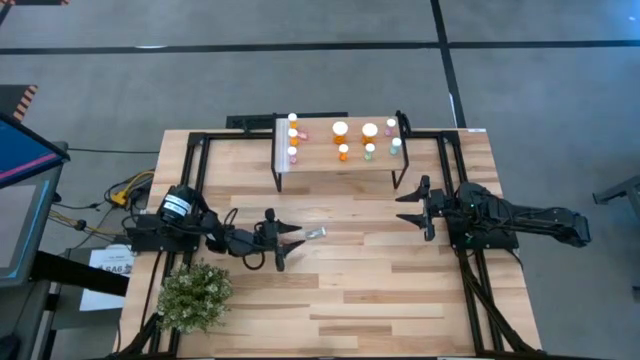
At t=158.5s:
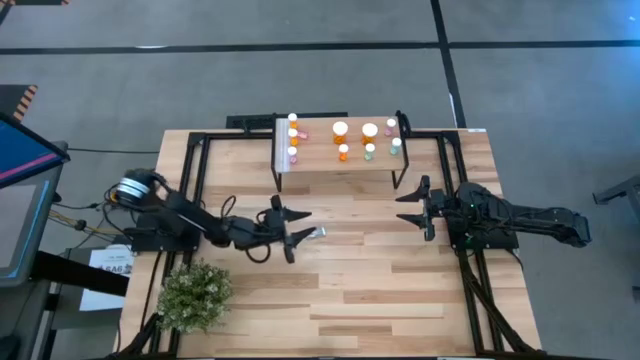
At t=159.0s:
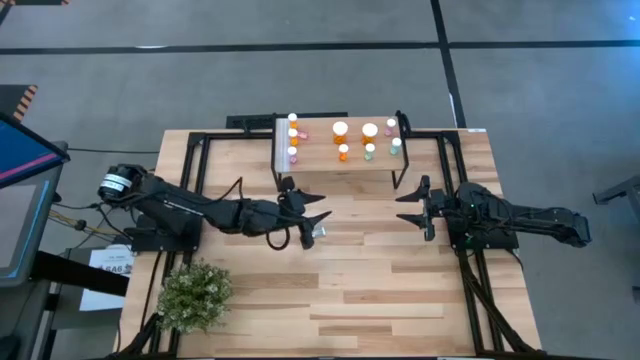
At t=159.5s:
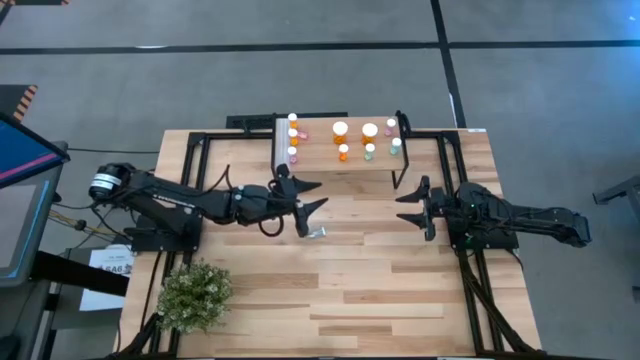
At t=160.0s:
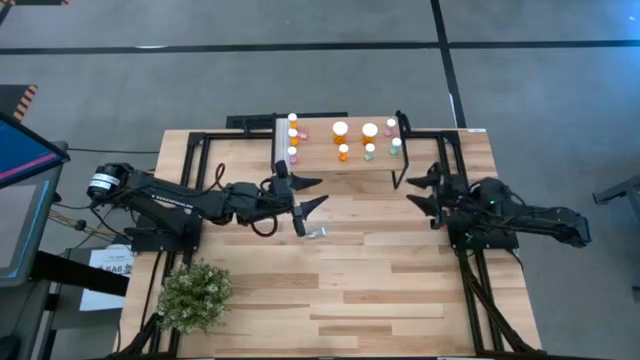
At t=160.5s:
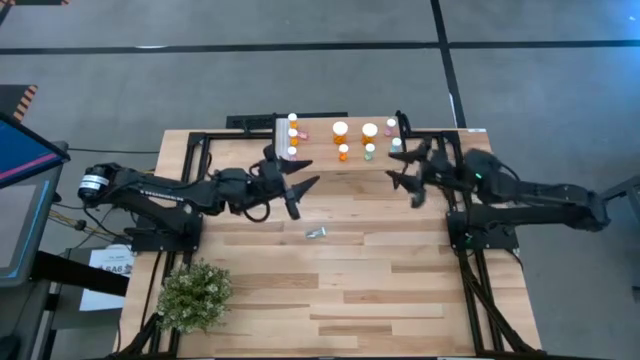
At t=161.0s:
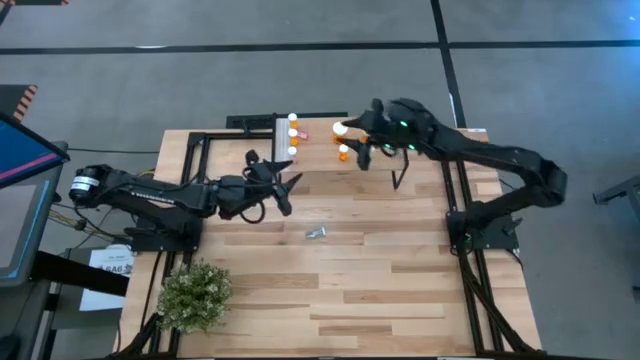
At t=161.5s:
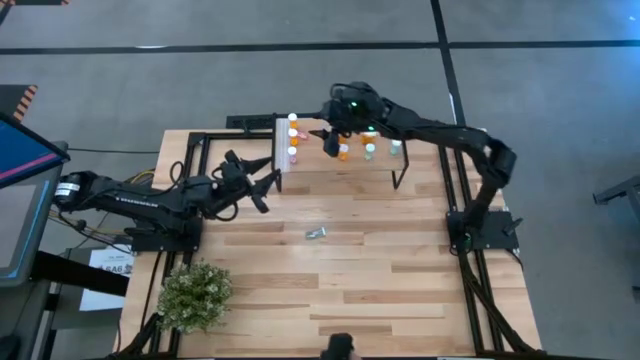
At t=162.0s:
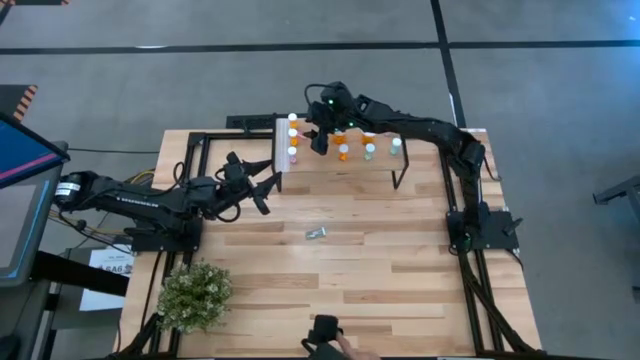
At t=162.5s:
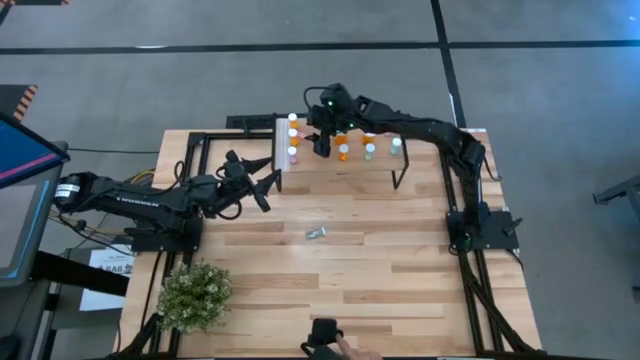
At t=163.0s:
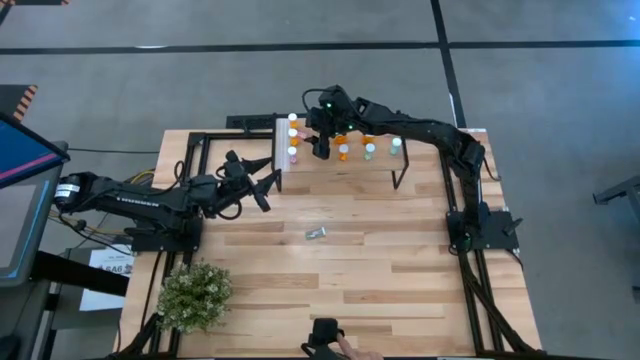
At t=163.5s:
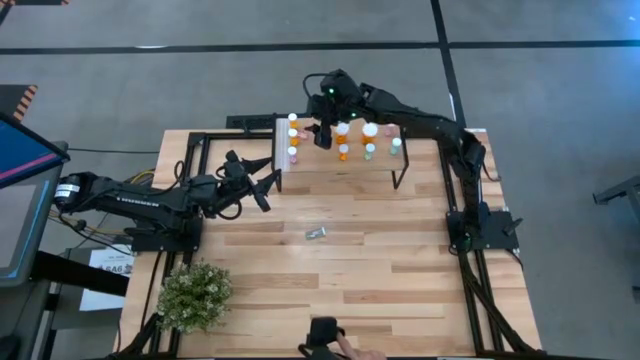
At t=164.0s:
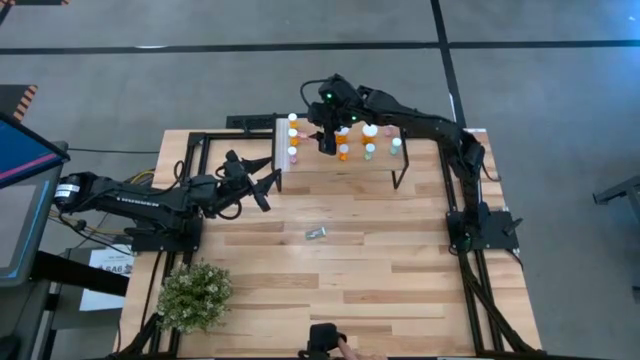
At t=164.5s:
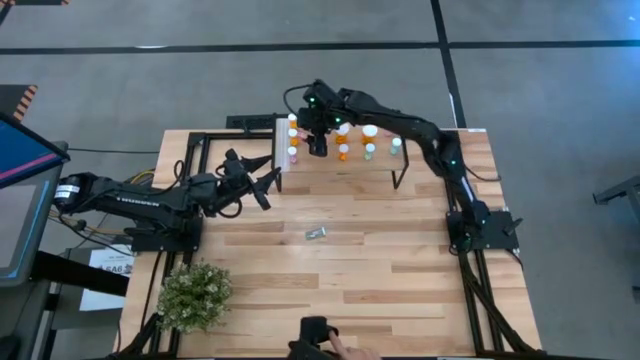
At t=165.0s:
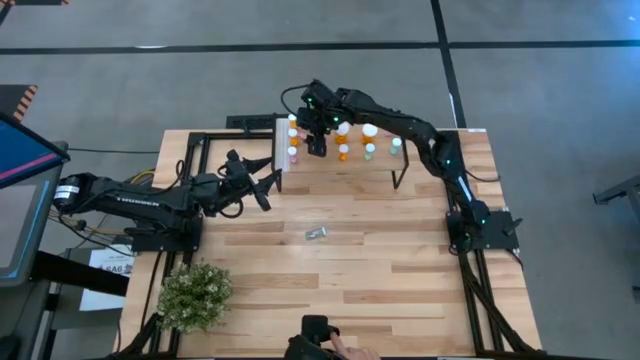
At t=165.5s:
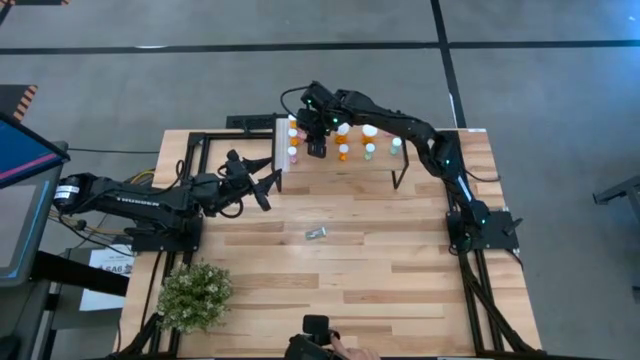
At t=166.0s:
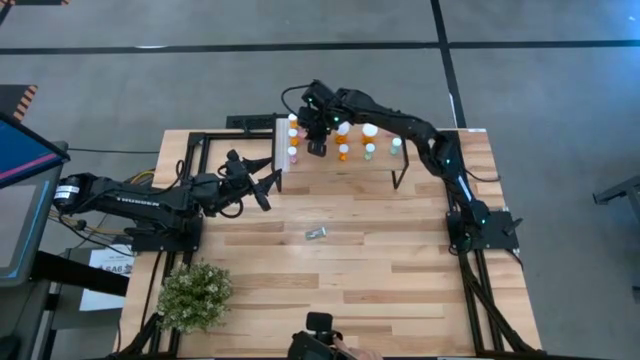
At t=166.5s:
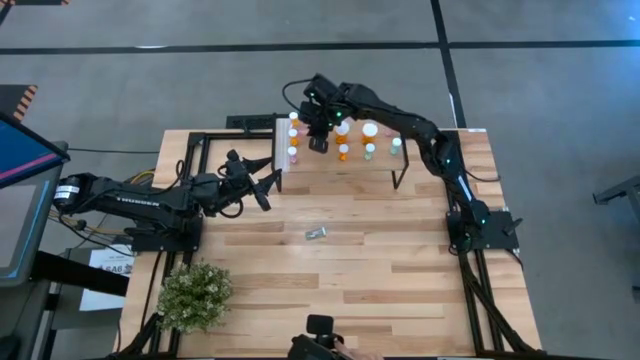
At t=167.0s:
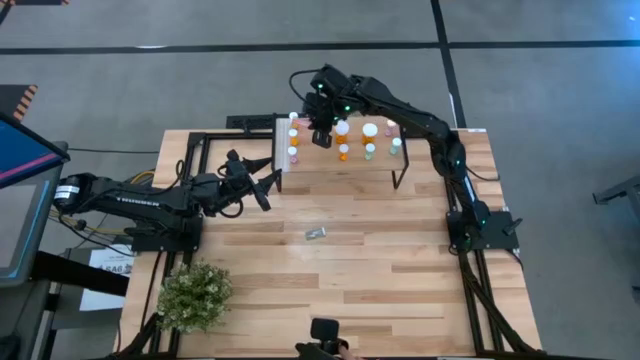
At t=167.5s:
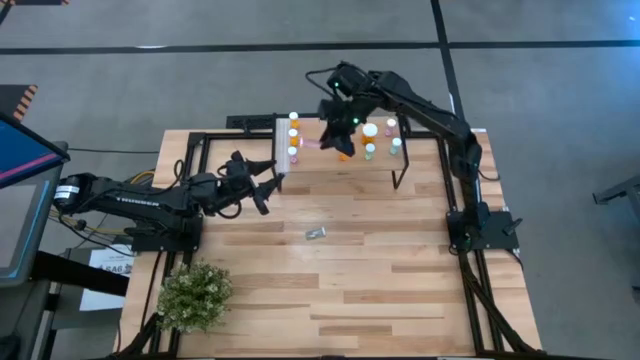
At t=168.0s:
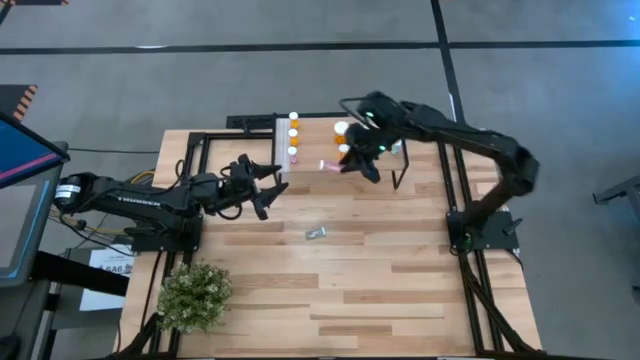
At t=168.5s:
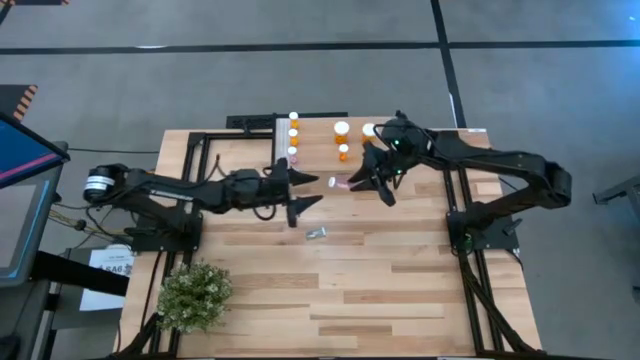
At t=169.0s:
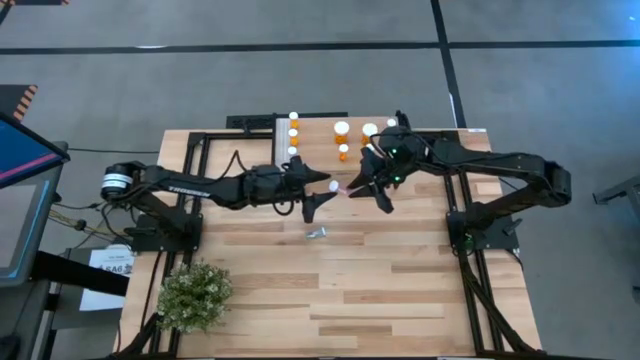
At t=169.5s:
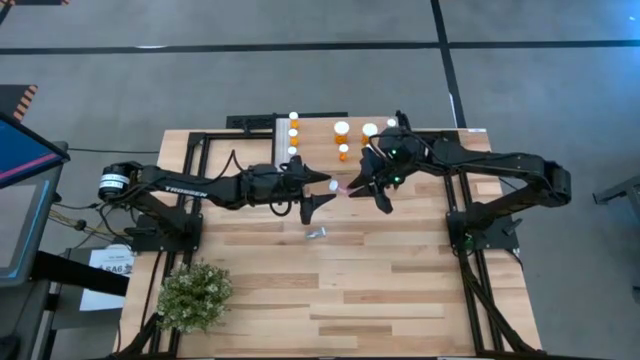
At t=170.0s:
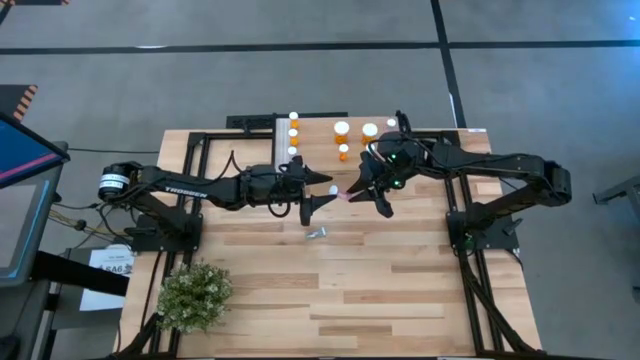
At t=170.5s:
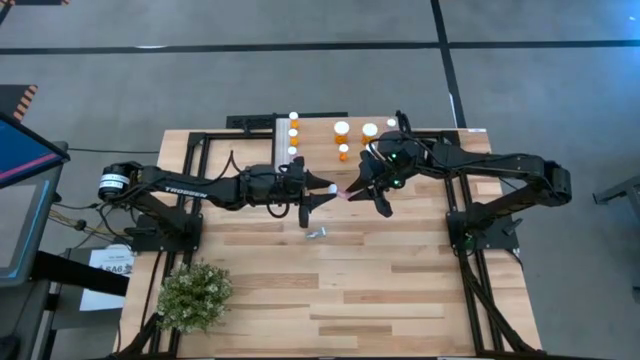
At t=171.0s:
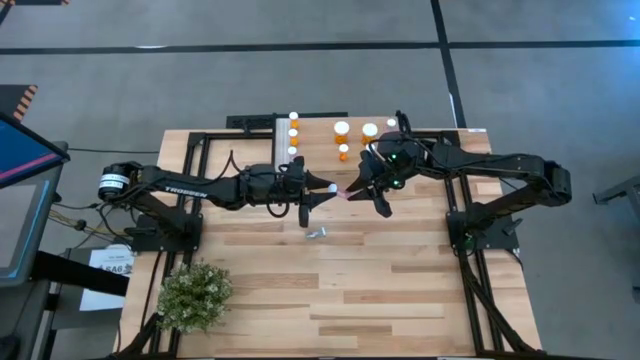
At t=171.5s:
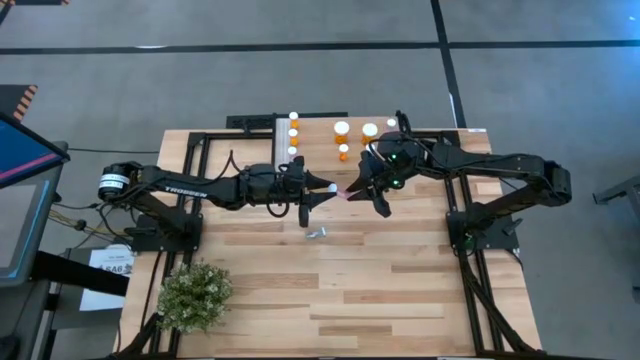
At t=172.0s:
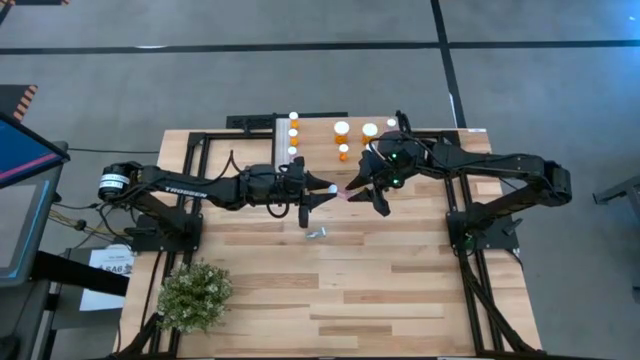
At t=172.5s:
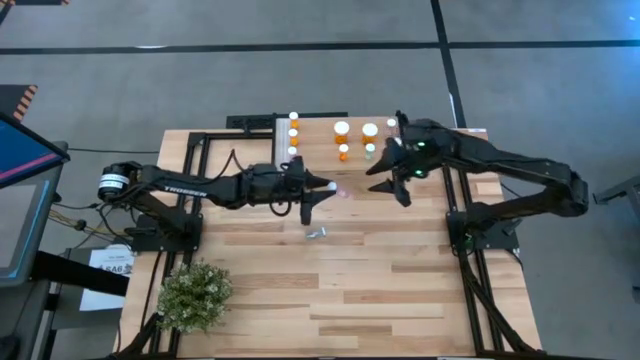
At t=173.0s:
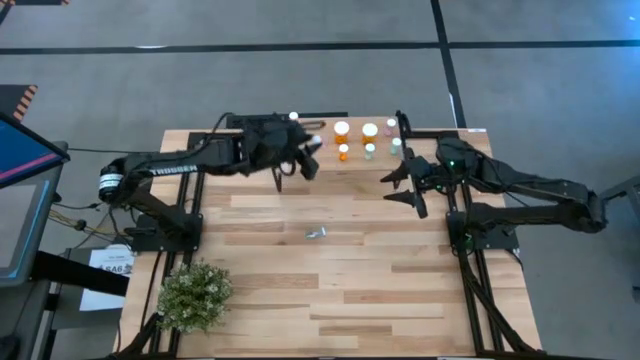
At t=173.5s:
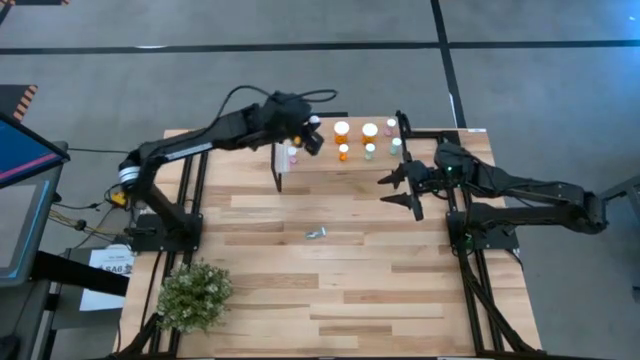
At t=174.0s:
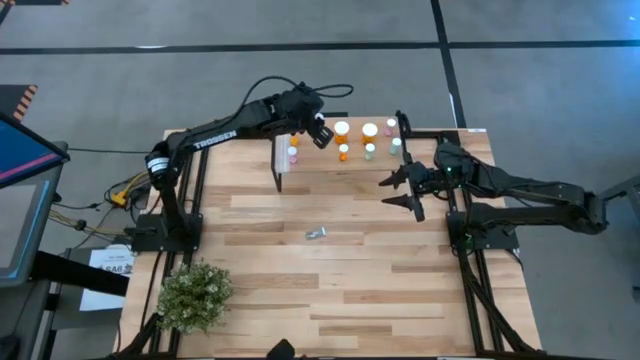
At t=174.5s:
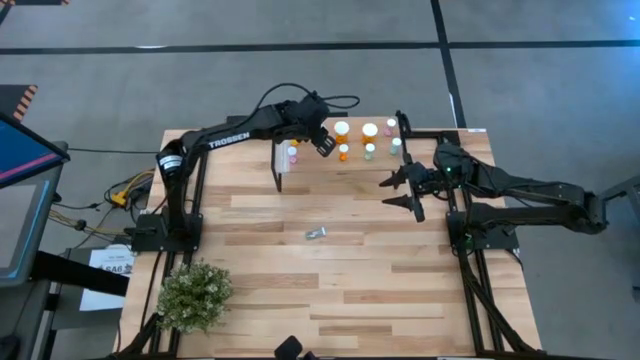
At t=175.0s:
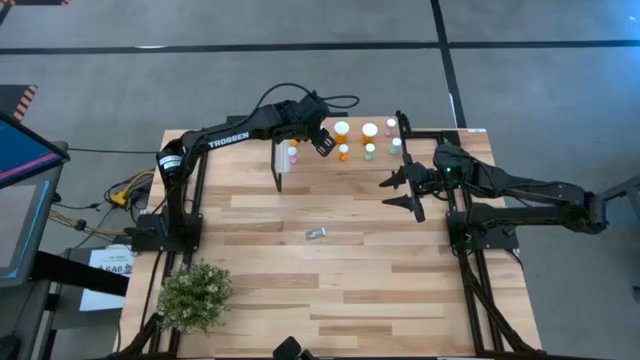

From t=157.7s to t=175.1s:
Task: Pick and place medicine bottles onto shelf by color
Adjust the small pink pill bottle on the shelf
